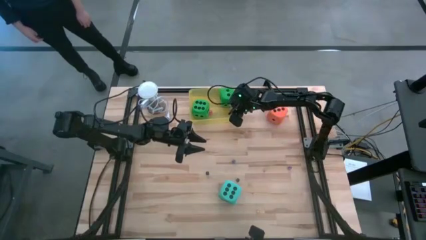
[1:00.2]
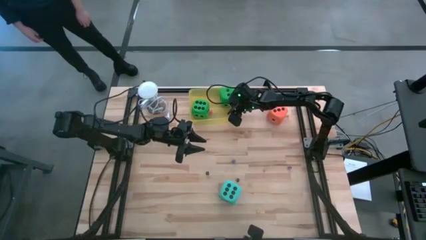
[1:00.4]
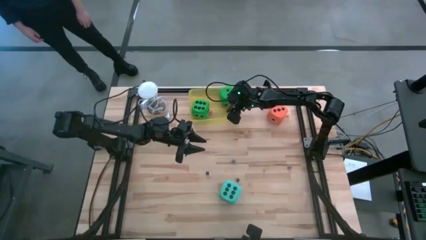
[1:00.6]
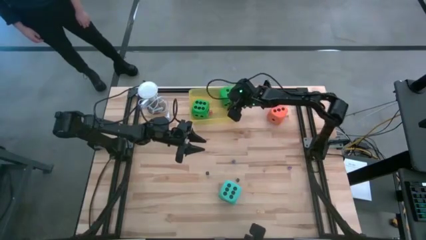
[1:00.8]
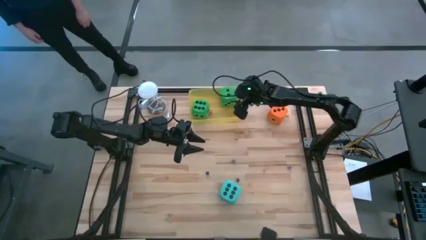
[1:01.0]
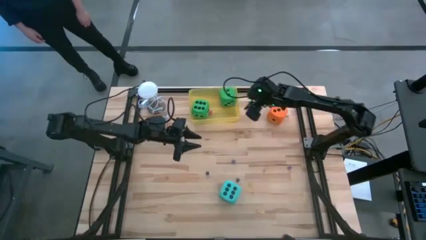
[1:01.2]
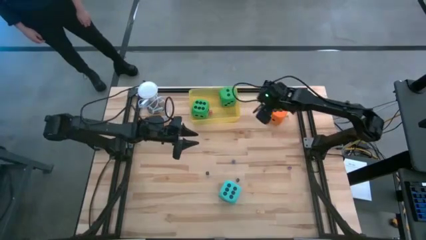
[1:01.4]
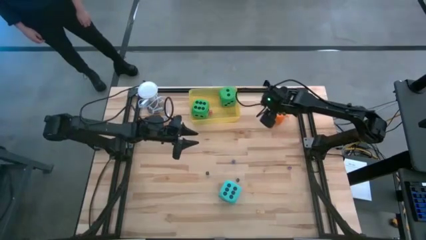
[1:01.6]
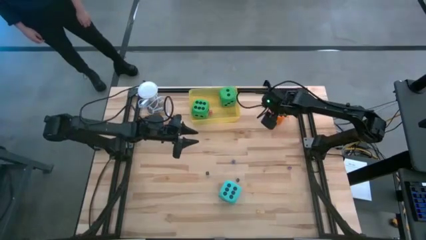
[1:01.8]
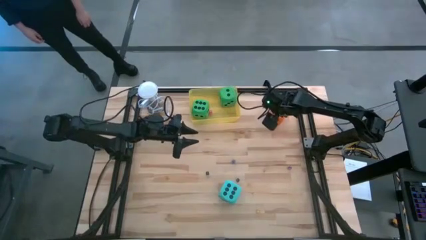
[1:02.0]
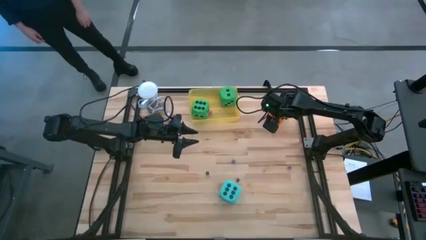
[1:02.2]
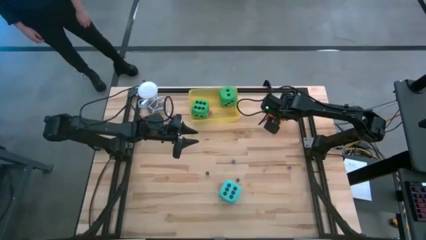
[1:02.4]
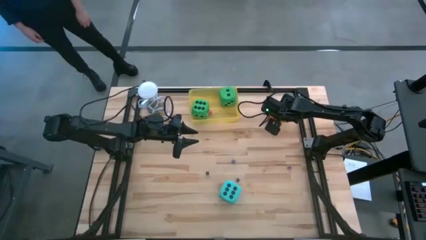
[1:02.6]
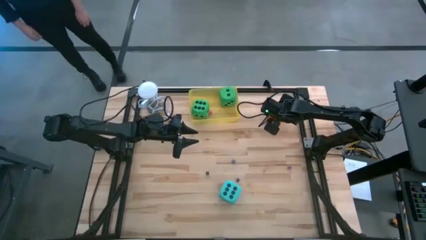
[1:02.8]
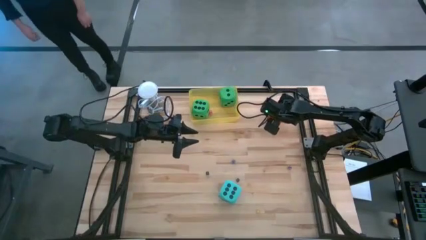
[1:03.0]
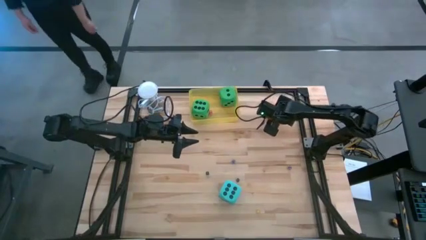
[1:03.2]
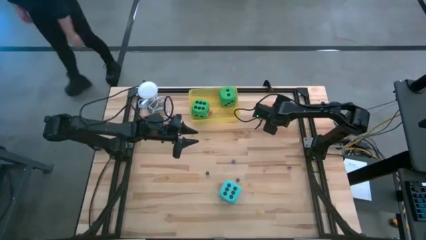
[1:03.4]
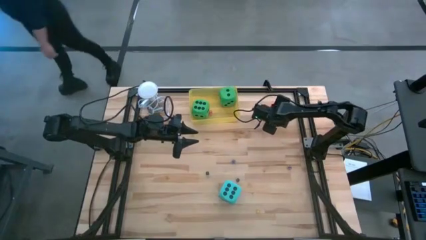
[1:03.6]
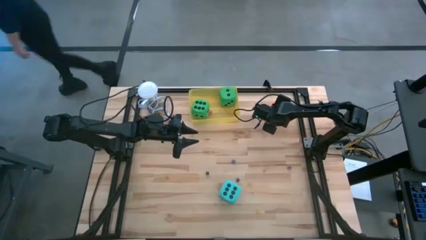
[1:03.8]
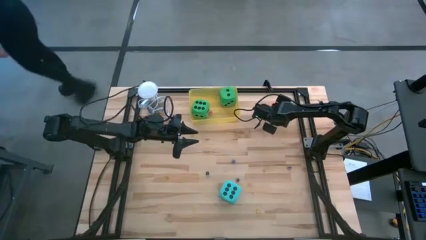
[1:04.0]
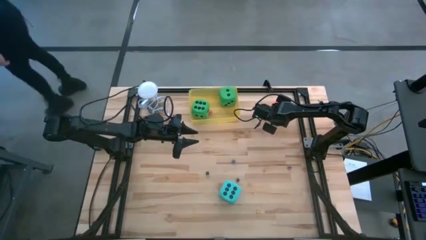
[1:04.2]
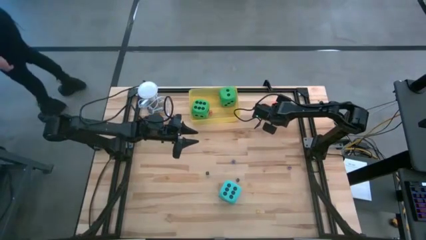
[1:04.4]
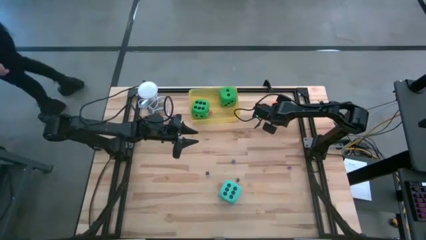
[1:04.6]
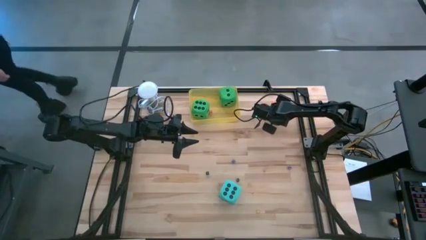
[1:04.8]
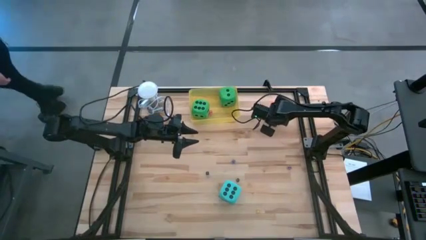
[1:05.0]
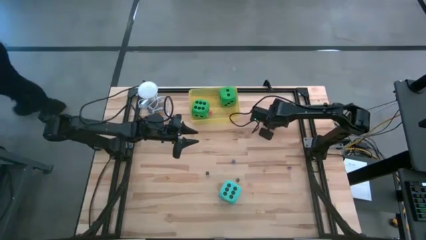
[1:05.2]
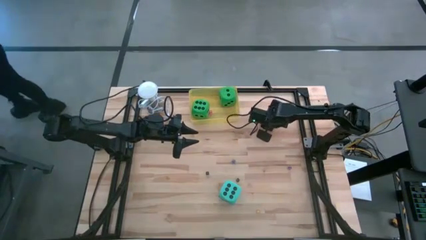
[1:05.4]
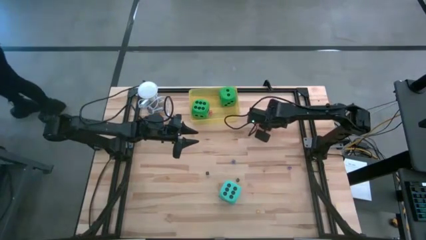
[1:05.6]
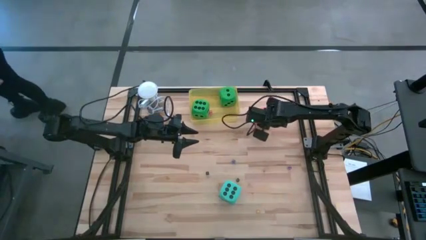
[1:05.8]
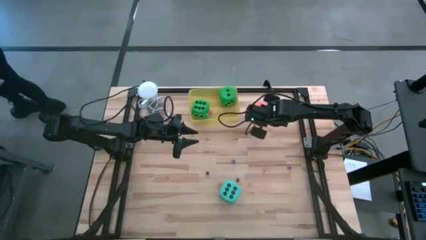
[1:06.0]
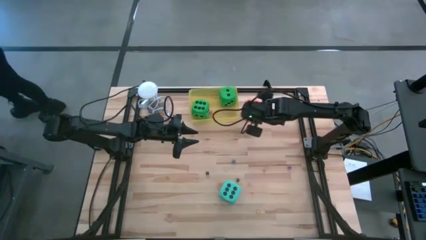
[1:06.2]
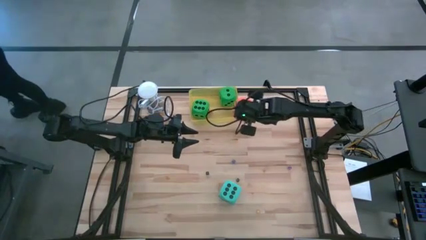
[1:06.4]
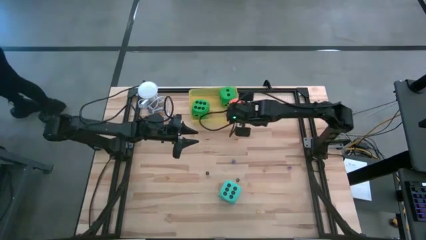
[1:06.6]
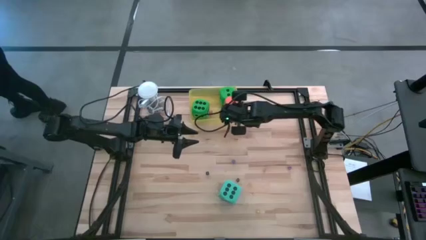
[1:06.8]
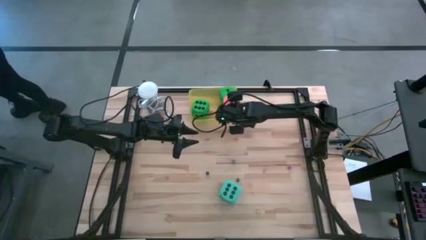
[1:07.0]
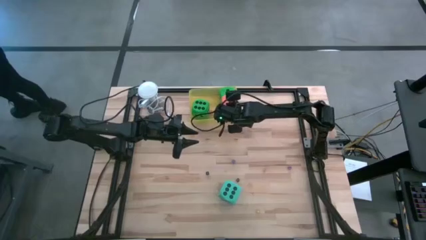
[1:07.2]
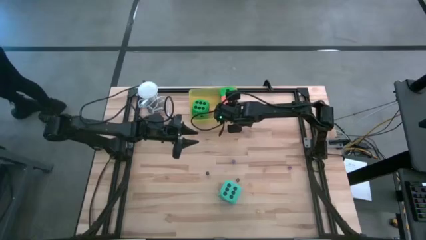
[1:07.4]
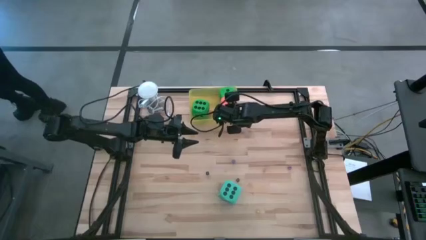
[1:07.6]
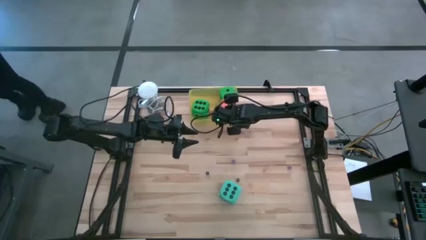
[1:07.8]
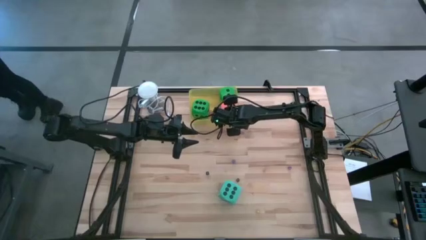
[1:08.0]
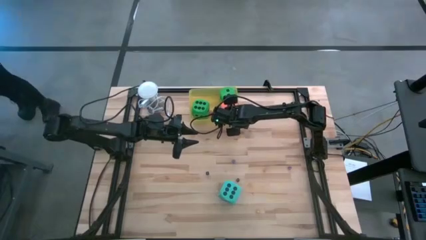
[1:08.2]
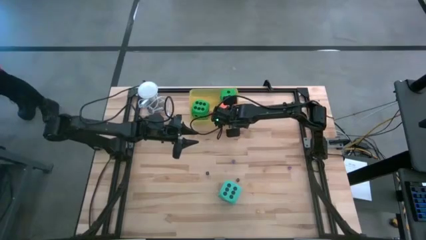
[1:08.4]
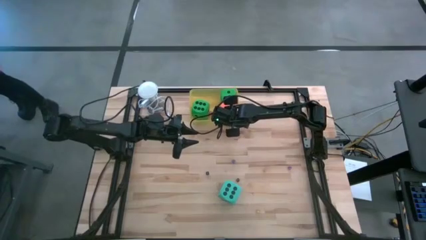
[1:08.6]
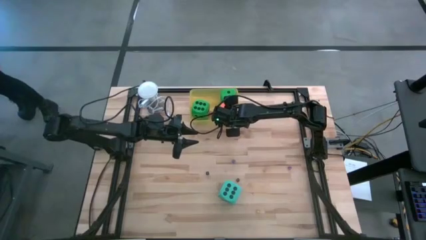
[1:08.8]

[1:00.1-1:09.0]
Task: Pick & Place Dice
Put the orange large die into the yellow bin

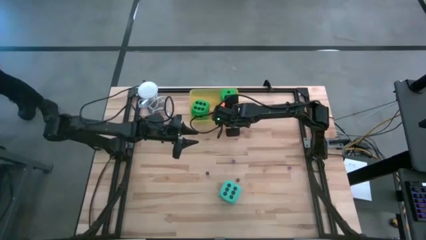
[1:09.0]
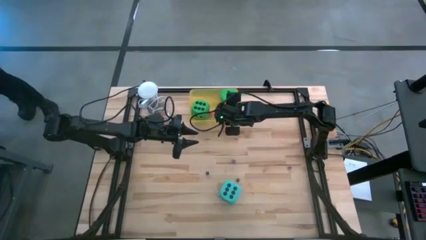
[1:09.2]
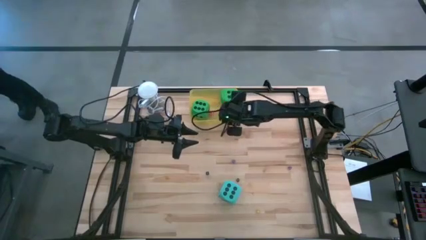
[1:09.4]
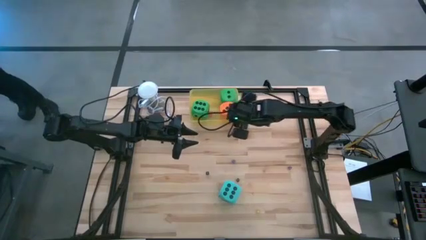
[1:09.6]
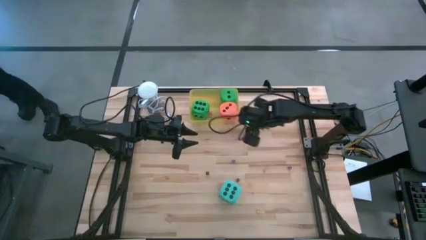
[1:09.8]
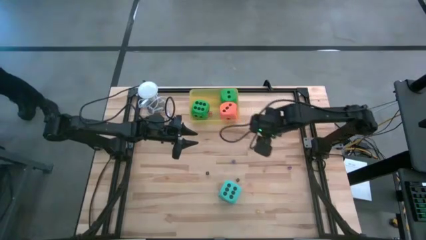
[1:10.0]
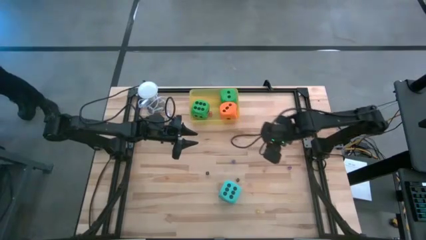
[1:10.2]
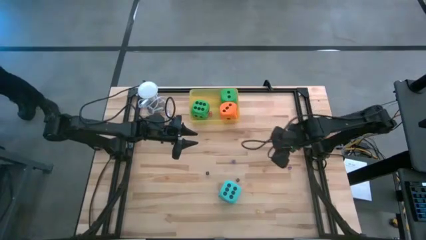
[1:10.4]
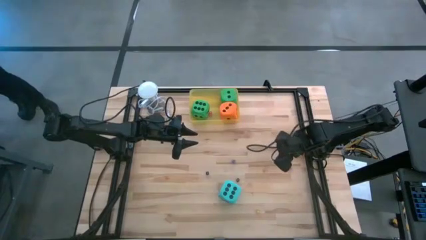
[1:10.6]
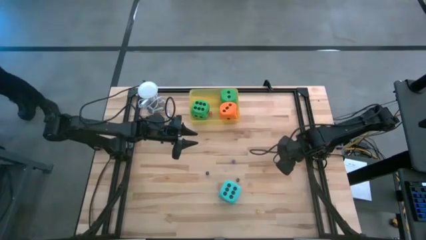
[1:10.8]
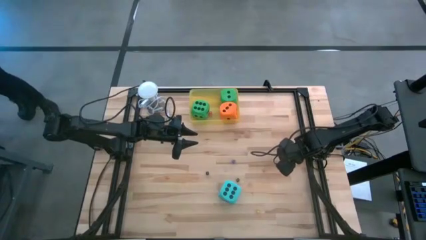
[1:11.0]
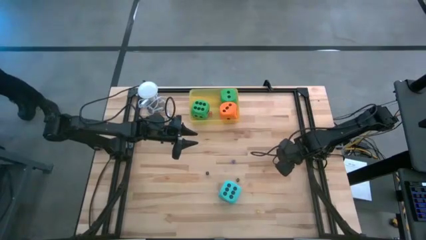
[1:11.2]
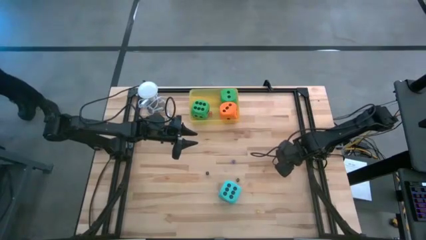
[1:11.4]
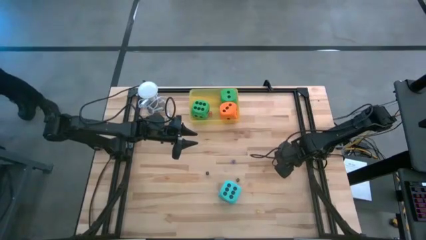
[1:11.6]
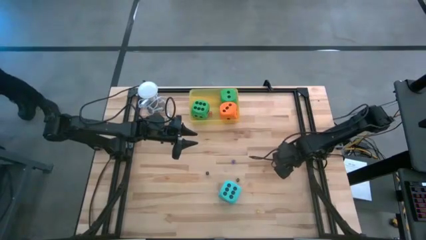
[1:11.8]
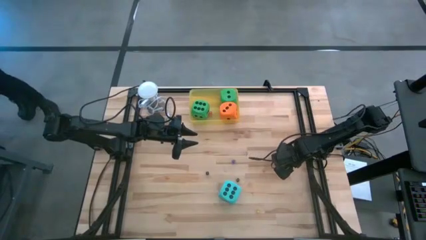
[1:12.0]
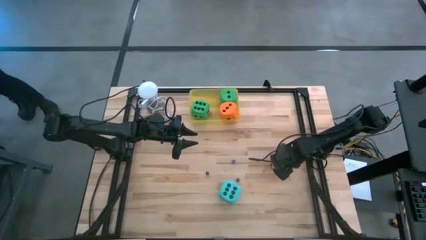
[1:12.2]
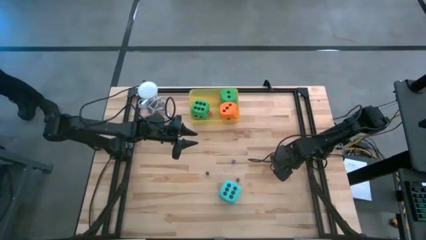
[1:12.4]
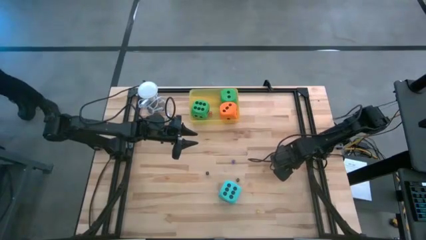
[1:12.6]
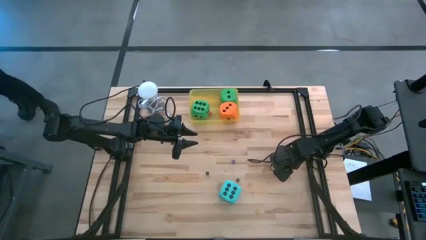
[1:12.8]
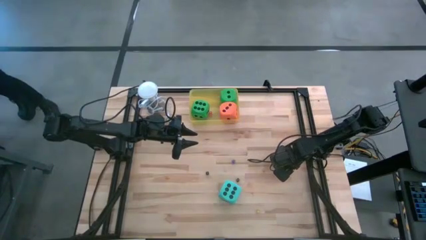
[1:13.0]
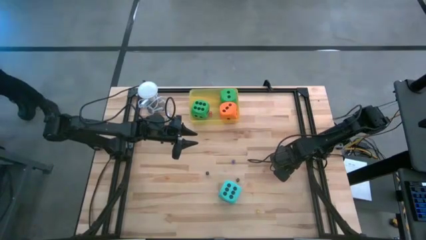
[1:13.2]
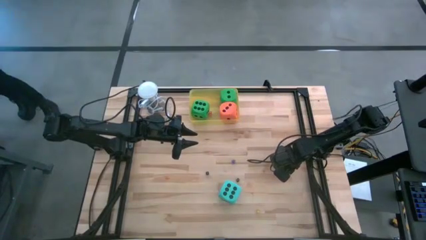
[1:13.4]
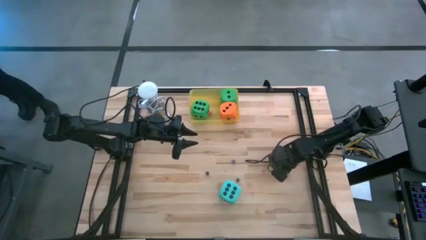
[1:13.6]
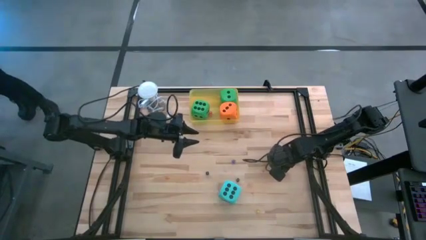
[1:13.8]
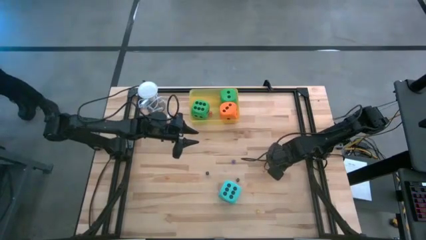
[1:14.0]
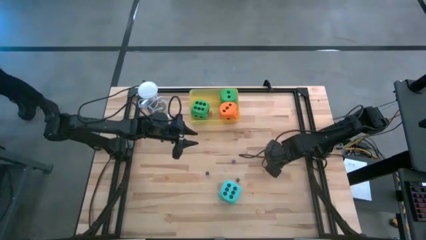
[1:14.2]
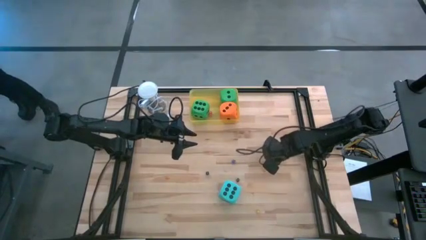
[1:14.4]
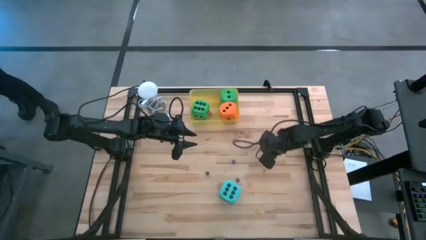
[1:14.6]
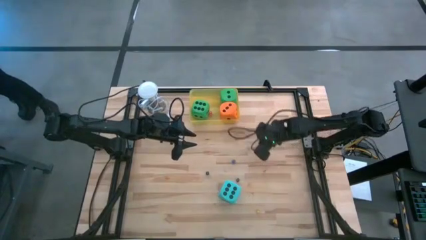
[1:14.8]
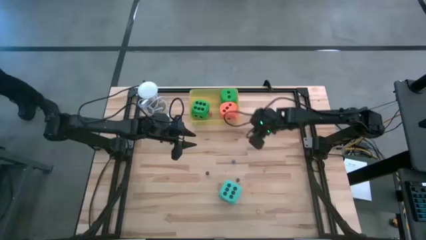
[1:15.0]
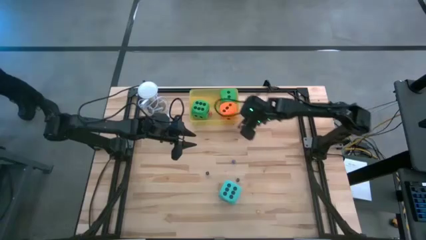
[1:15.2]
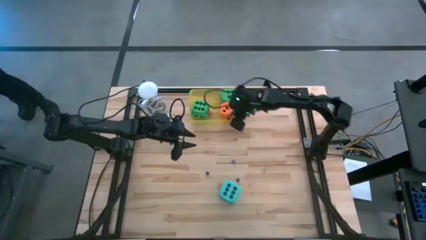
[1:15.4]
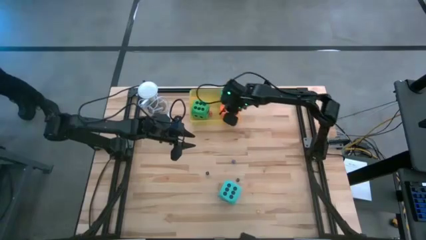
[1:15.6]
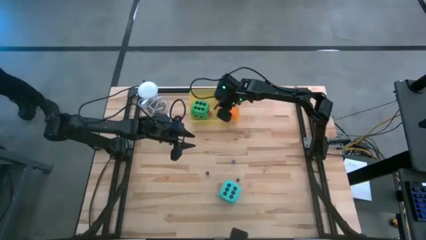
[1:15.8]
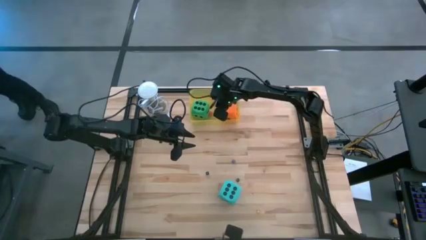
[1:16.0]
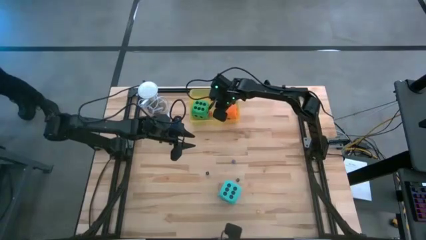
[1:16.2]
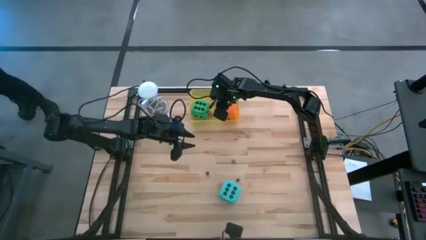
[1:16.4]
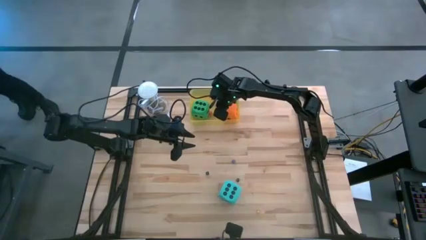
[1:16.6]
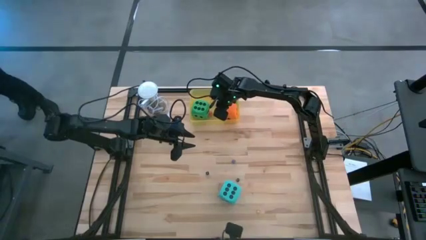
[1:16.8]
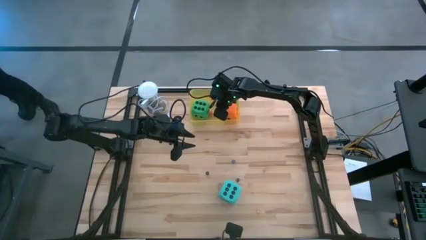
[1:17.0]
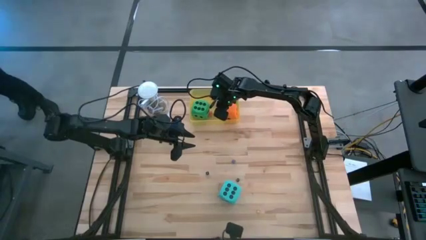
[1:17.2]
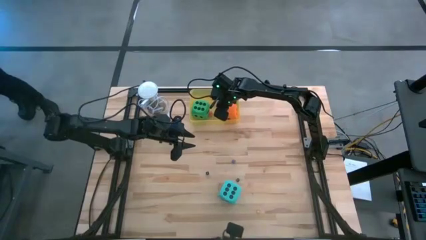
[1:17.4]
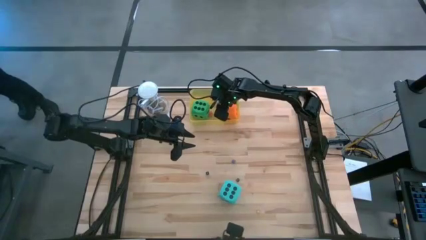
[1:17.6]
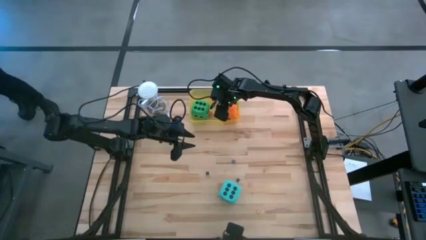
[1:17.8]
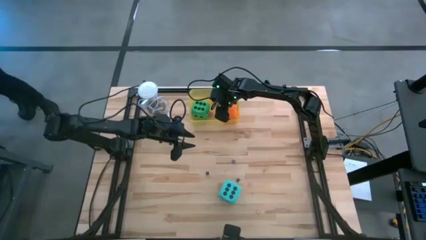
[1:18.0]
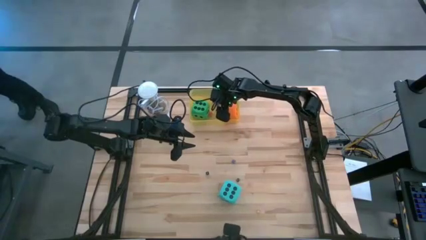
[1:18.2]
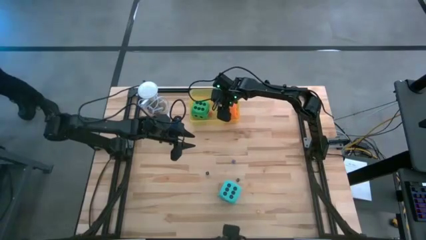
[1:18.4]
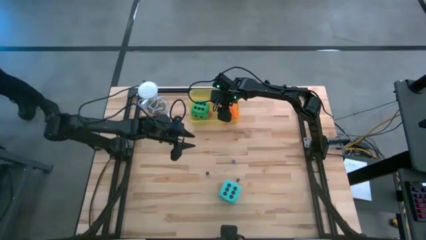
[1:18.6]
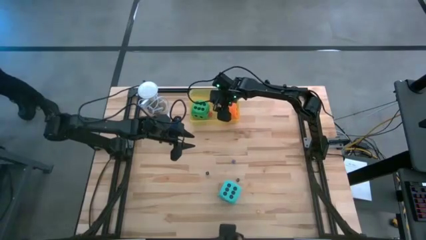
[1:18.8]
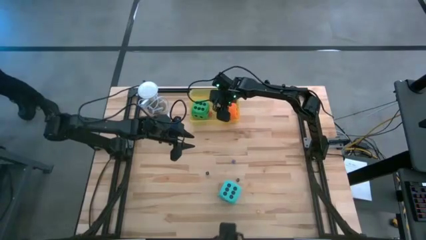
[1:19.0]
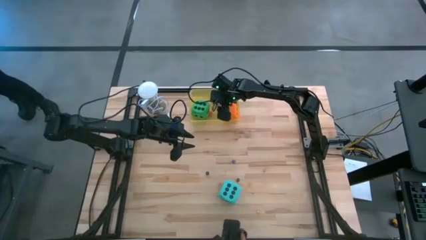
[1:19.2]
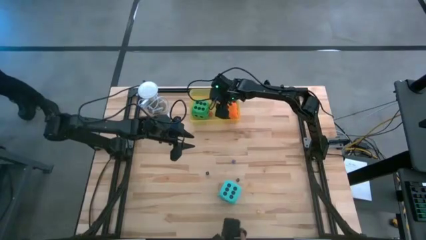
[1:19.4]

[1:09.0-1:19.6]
Put the violet small die into the yellow bin
